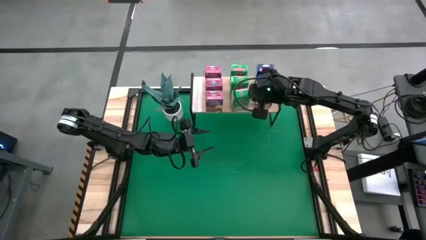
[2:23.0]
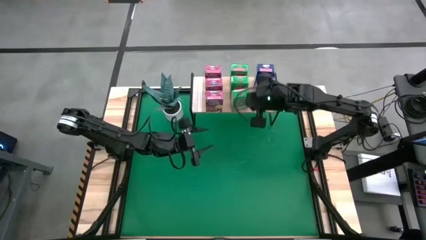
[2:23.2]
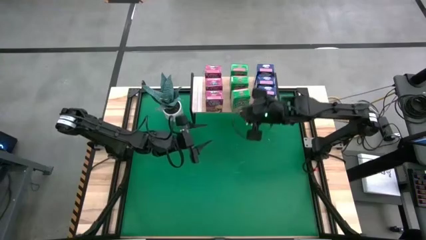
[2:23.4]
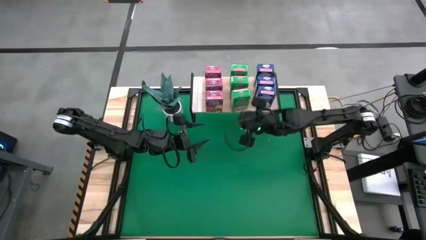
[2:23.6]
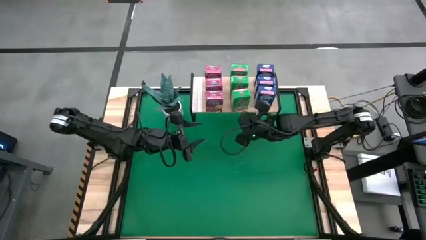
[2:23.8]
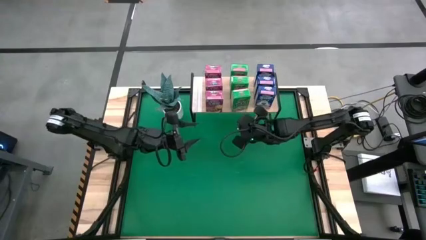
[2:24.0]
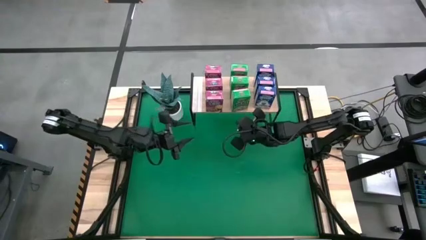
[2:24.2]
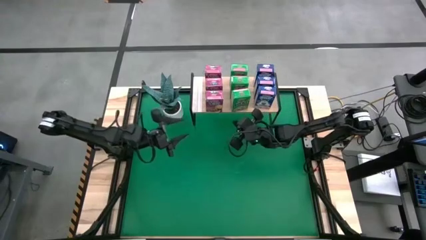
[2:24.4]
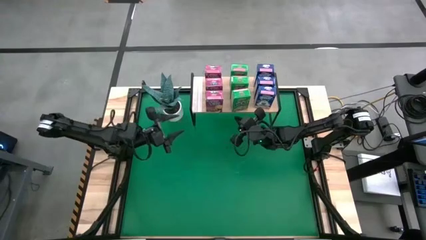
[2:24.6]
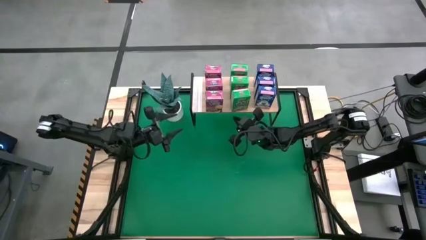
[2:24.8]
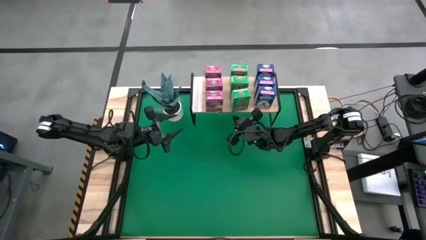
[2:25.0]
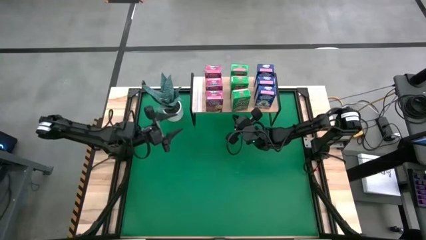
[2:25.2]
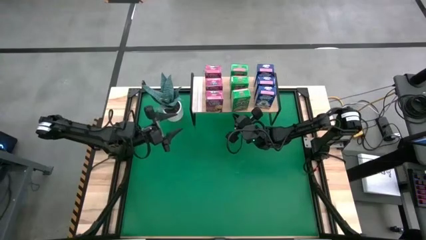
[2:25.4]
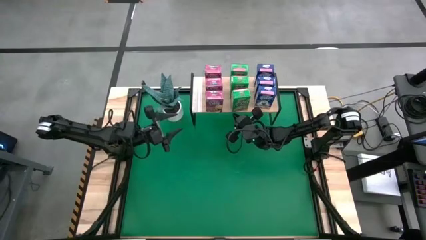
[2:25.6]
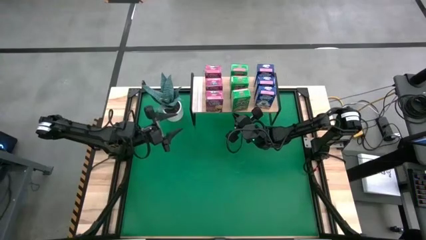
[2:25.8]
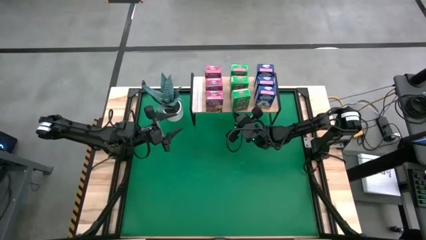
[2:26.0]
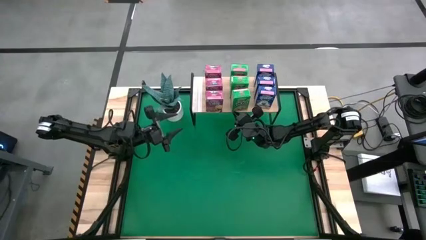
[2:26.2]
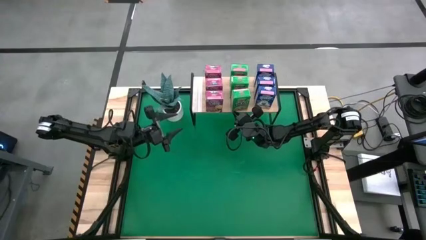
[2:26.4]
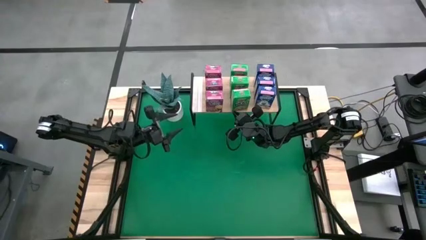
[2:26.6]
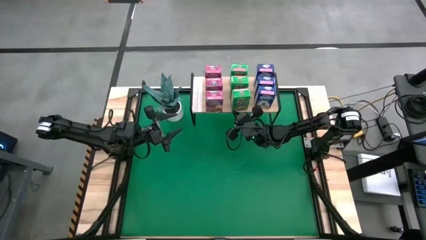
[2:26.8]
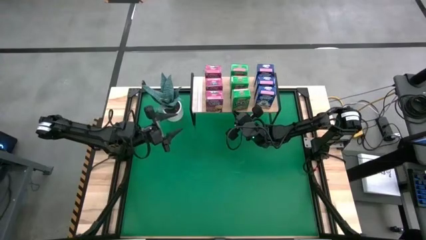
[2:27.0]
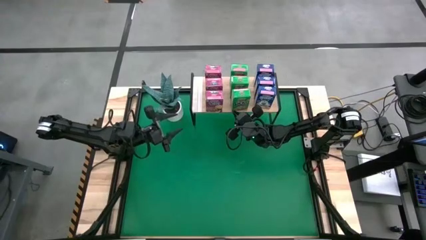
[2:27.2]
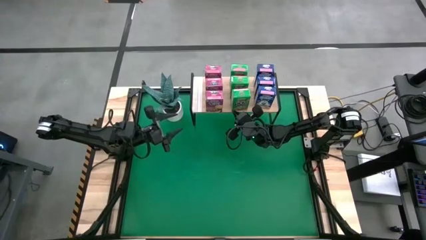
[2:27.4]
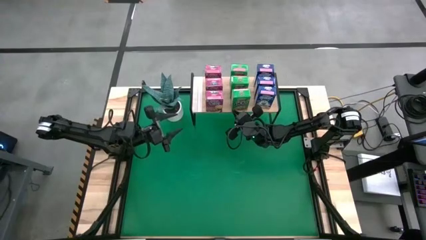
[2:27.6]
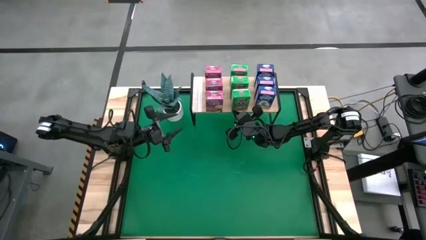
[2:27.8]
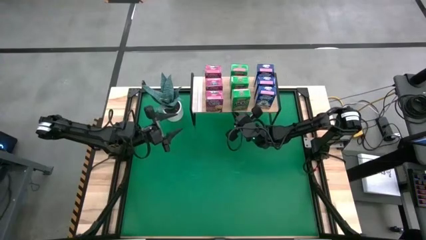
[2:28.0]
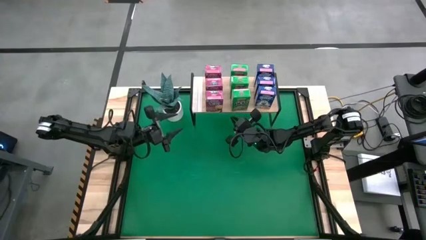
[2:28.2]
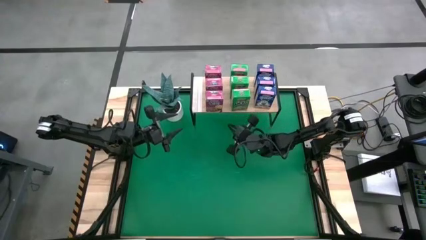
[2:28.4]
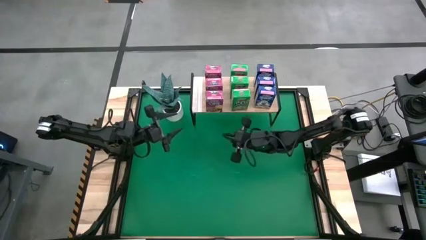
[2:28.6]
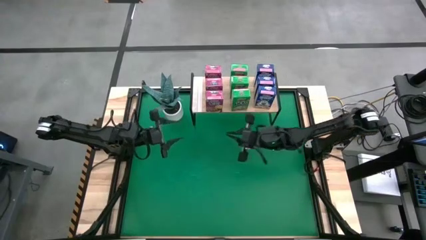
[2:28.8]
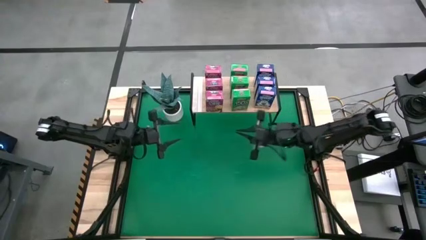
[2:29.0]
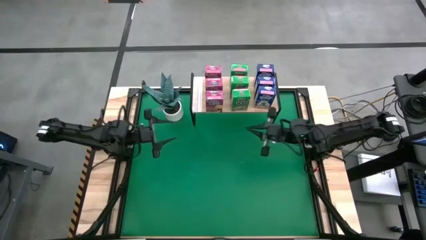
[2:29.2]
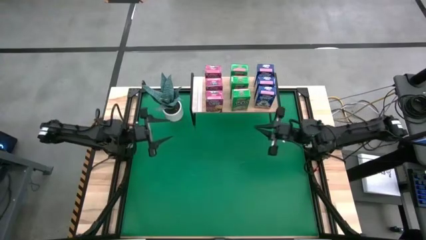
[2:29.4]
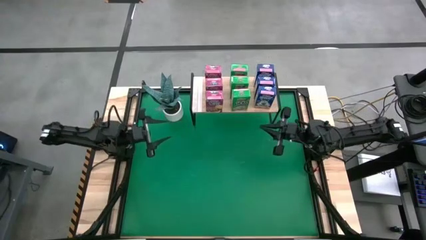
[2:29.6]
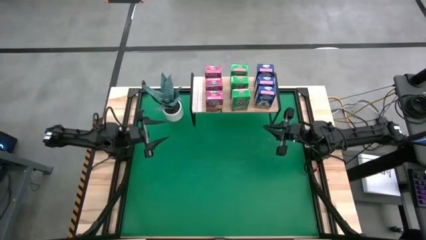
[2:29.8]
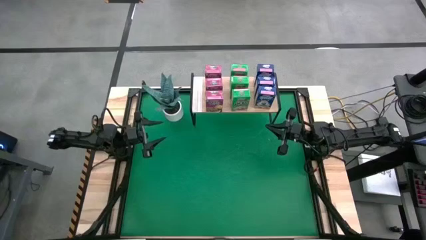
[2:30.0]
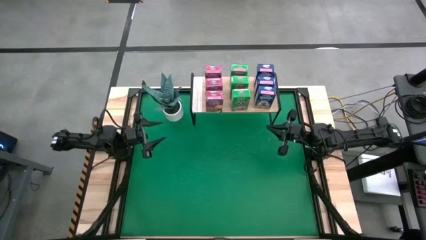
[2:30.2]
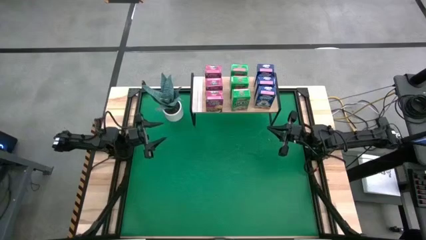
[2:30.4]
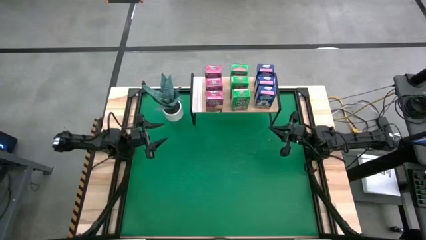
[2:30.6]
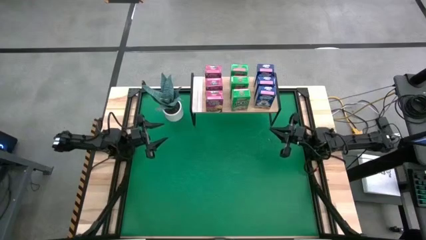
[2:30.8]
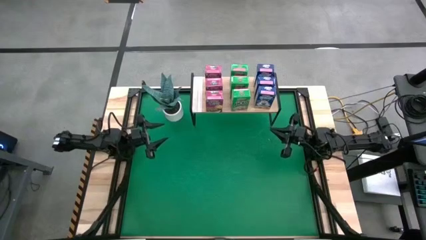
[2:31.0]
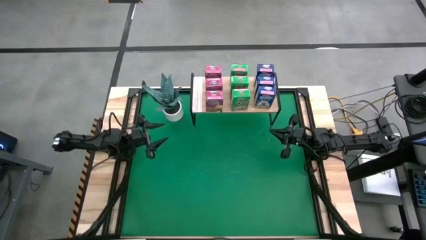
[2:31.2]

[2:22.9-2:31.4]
Task: Stack cereal on shelf
Return to Home Position
